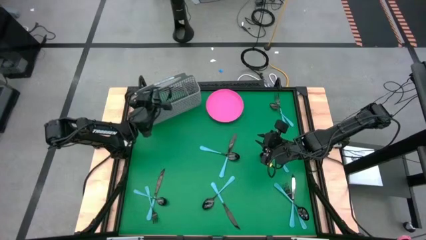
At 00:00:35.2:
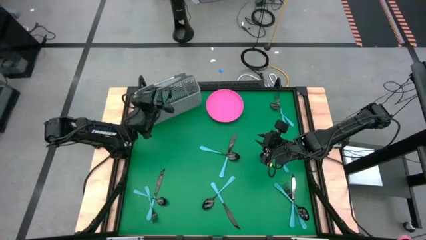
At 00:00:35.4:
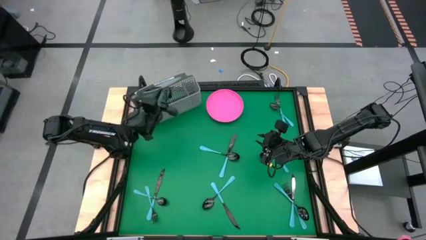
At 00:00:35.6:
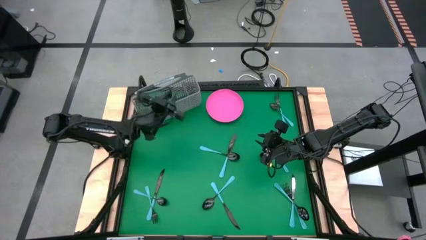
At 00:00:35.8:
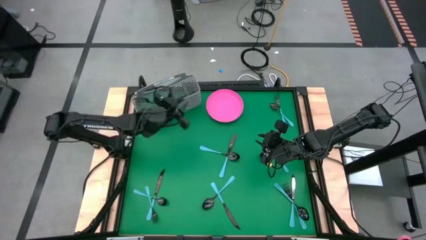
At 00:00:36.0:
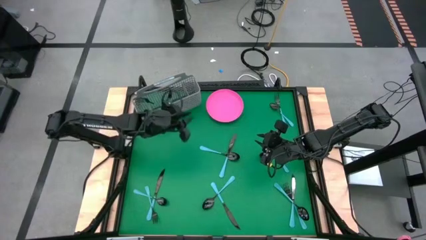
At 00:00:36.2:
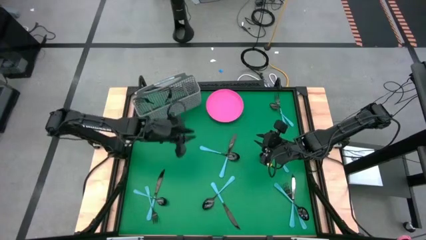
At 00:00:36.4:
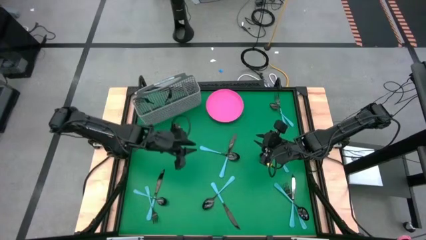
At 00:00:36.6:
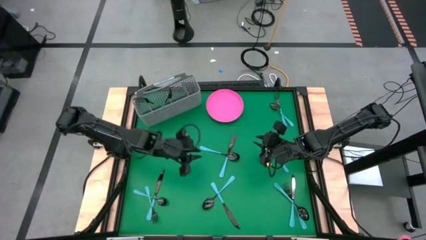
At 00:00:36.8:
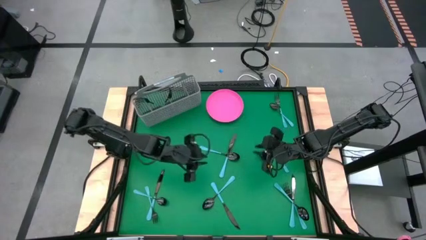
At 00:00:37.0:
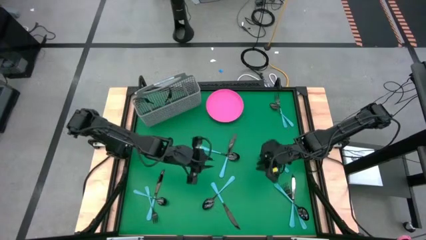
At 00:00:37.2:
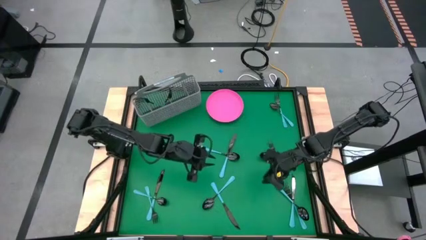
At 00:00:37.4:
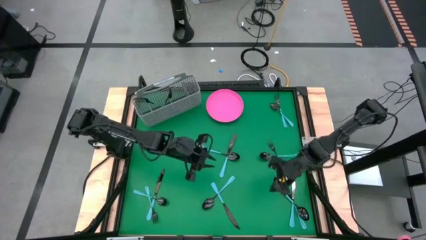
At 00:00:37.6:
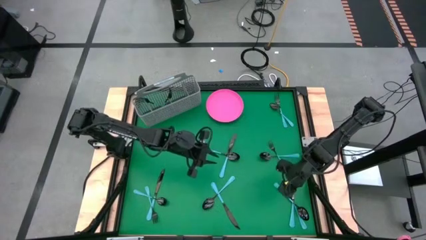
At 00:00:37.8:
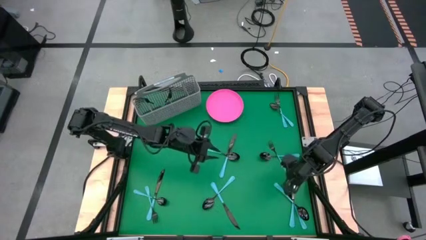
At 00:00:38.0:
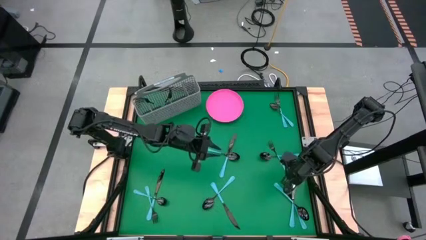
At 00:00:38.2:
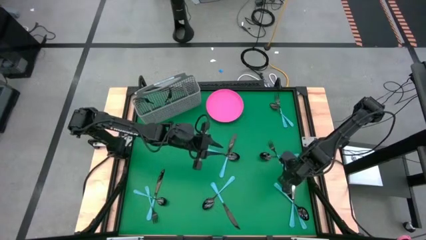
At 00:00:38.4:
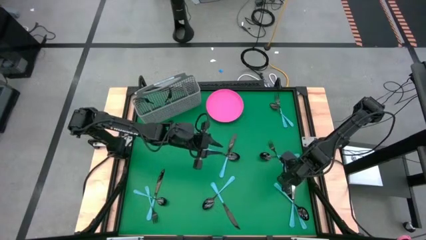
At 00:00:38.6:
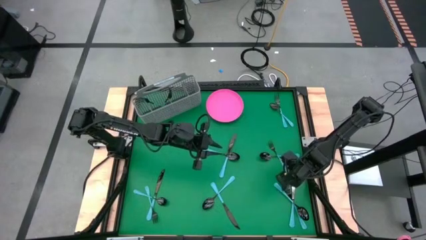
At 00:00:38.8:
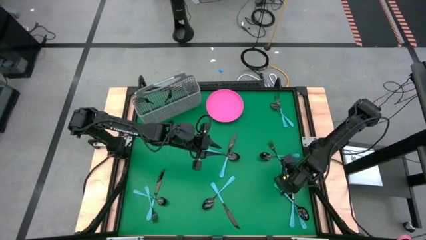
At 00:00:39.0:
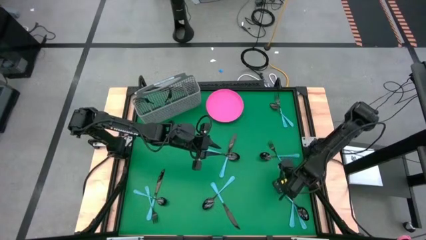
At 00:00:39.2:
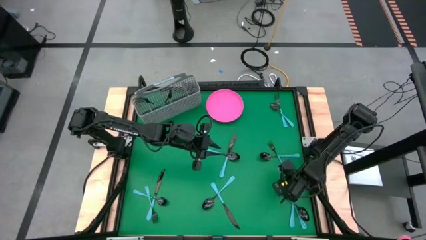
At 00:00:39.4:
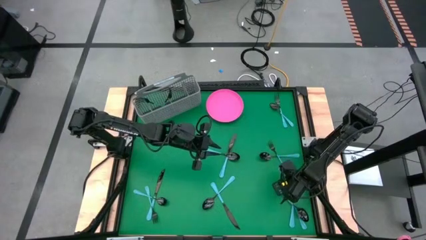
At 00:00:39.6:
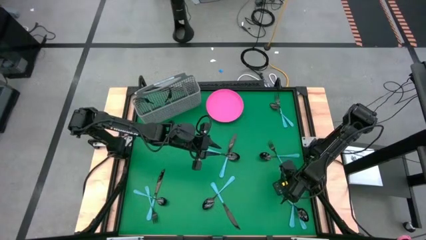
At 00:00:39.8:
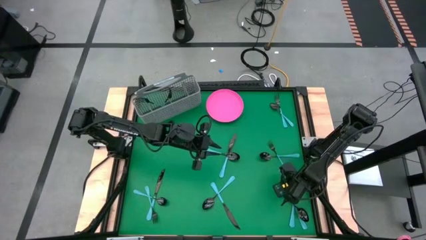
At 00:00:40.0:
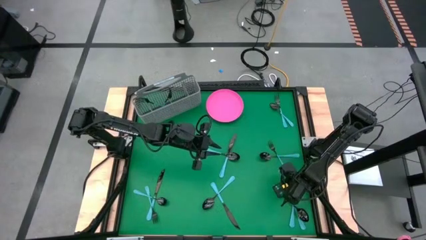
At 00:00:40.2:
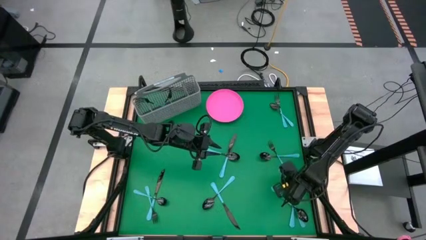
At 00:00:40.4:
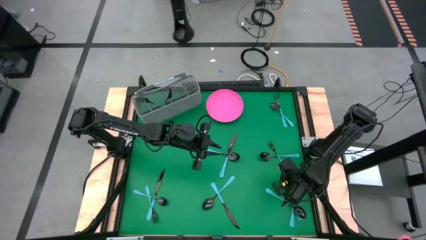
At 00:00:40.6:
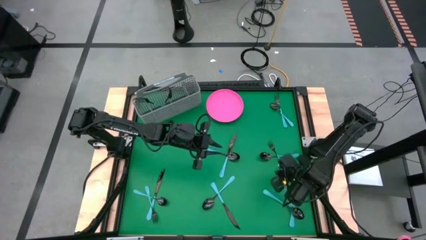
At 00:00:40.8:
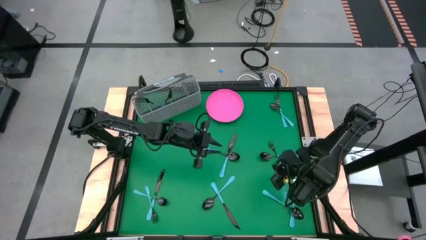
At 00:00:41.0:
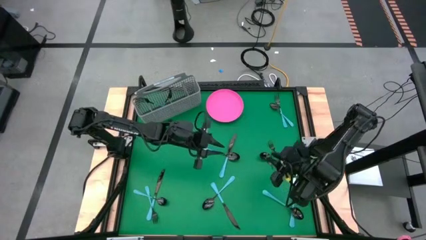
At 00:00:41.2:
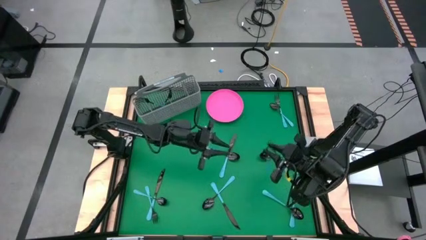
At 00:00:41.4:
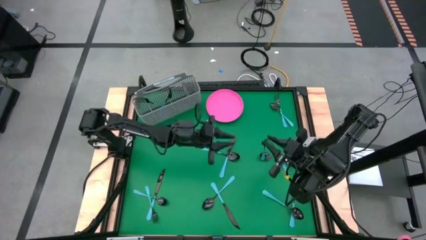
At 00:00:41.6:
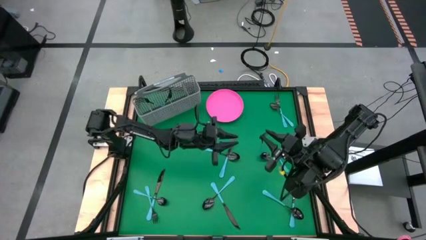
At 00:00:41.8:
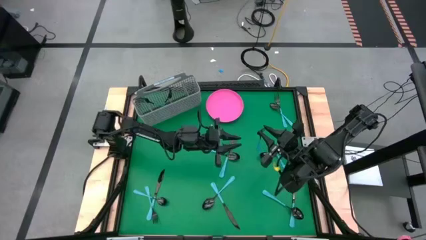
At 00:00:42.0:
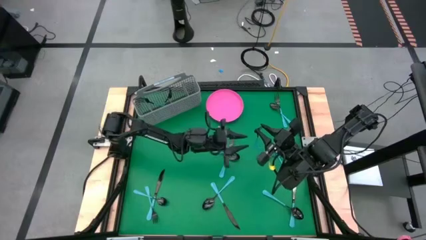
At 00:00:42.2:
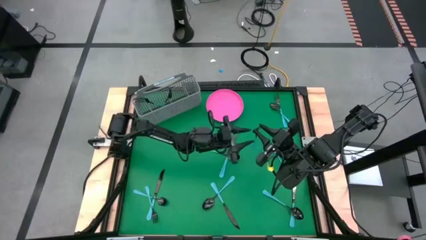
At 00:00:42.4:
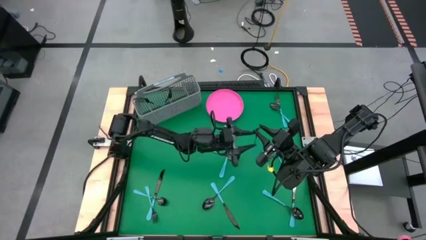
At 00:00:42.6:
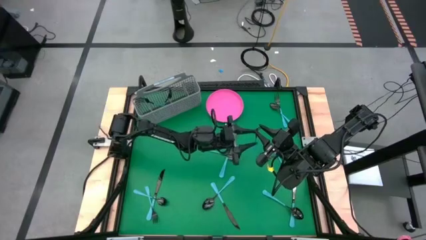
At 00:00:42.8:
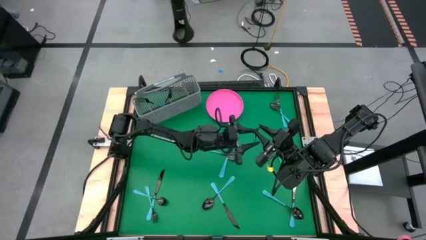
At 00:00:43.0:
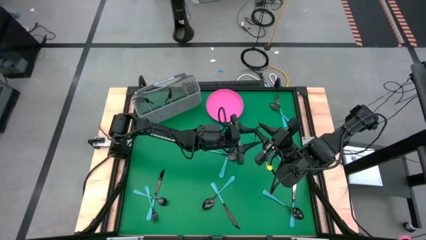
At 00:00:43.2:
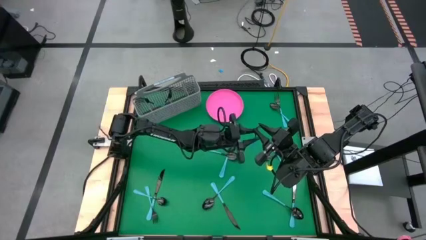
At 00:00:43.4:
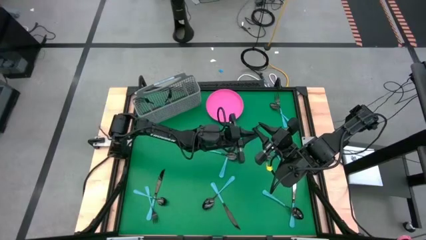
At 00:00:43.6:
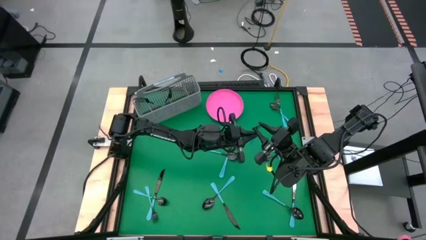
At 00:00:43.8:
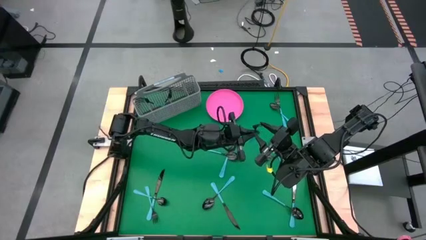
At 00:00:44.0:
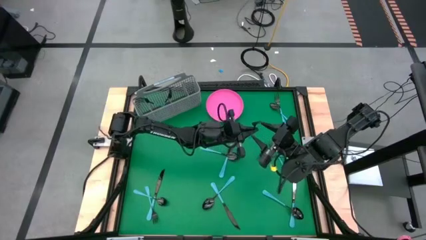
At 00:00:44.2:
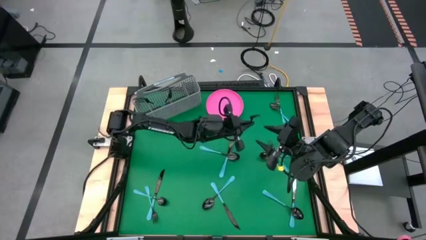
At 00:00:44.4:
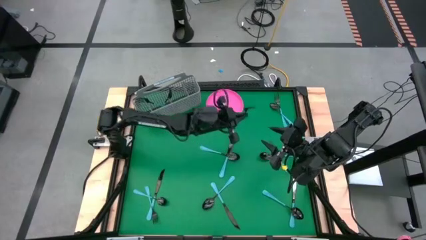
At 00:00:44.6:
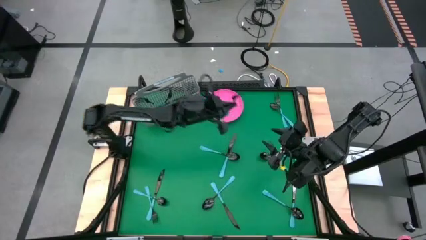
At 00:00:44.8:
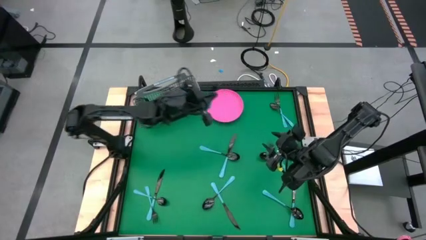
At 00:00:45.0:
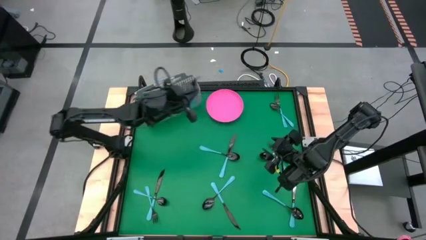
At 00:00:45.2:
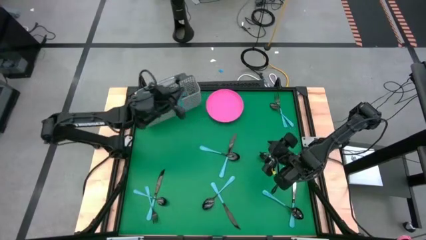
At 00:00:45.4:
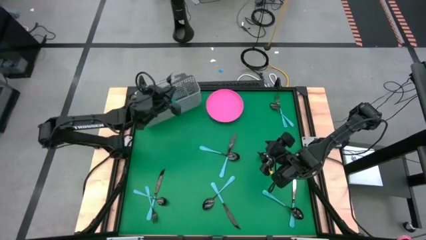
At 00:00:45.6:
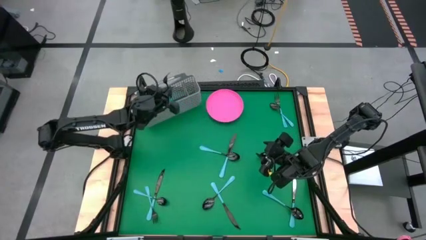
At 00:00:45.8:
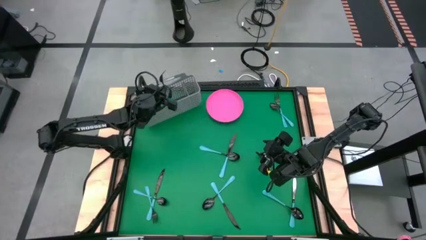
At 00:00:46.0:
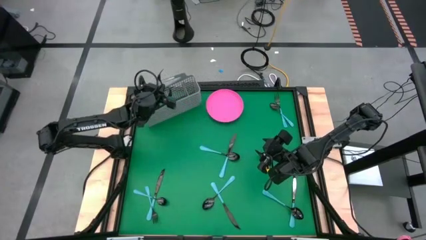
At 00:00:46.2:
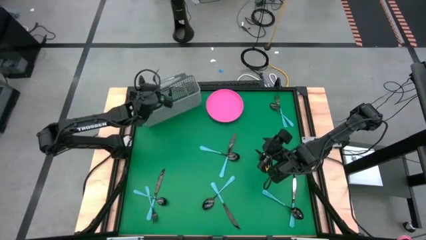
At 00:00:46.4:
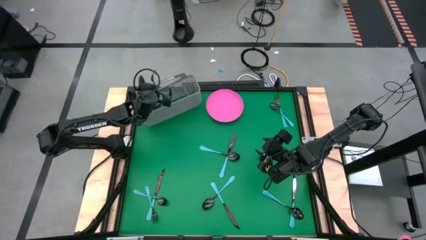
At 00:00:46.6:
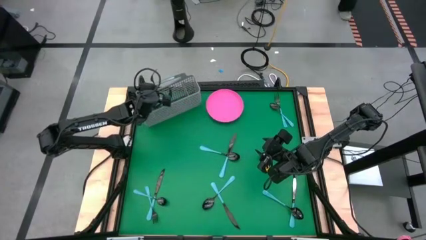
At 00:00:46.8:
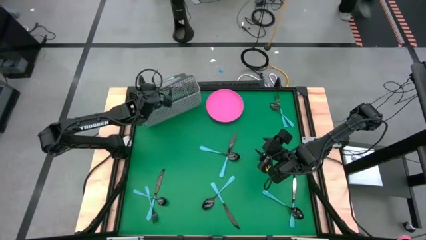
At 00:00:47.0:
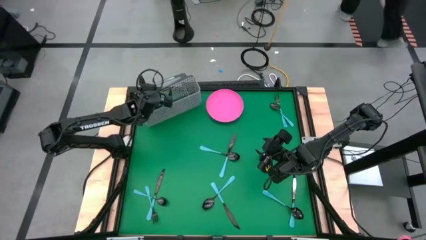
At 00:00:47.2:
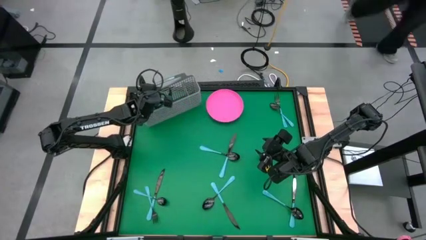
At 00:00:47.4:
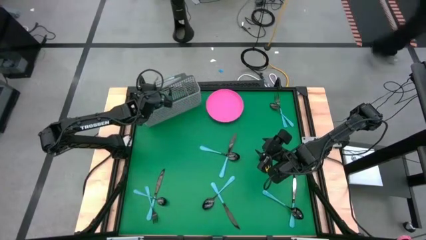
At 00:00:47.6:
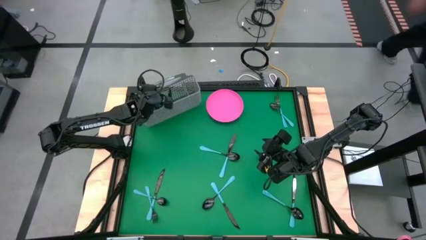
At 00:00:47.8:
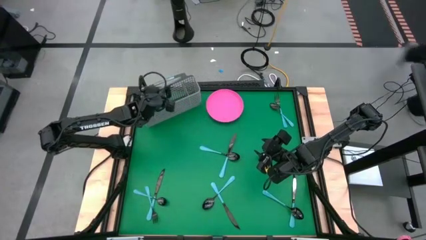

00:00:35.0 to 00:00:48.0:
Task: Sort silverware
Put the blue fork into the gray silverware holder

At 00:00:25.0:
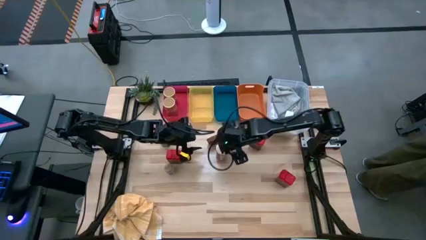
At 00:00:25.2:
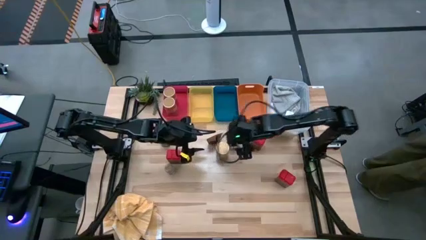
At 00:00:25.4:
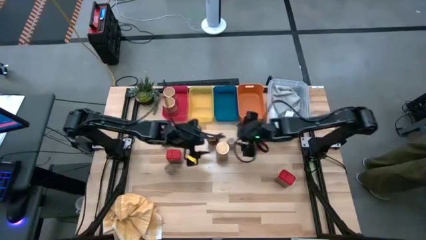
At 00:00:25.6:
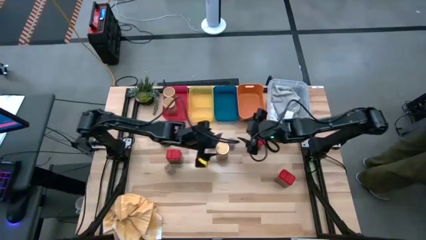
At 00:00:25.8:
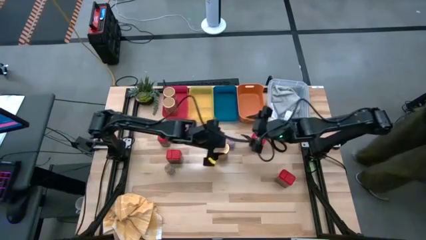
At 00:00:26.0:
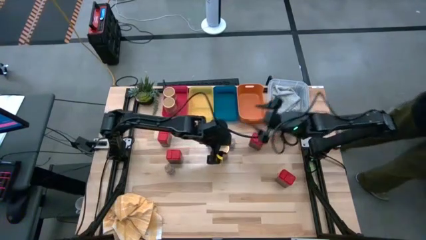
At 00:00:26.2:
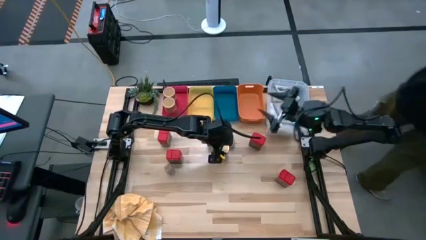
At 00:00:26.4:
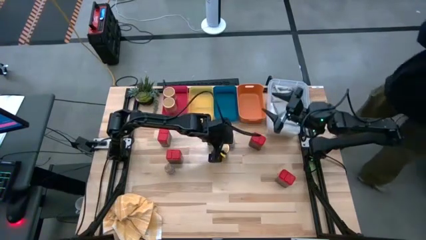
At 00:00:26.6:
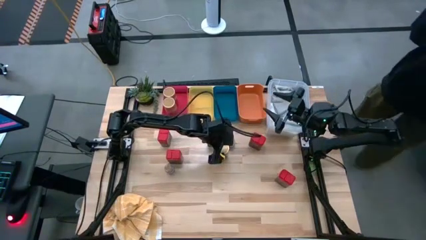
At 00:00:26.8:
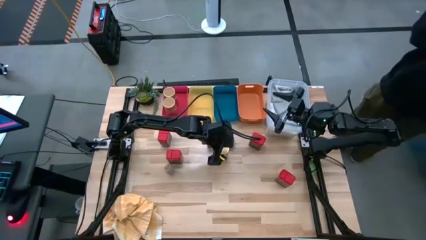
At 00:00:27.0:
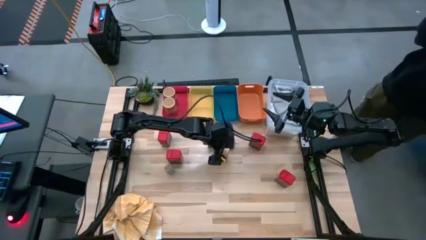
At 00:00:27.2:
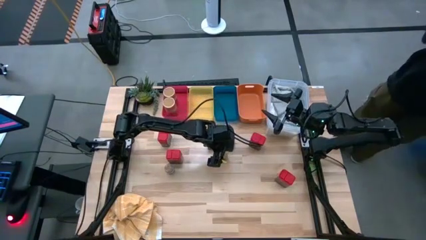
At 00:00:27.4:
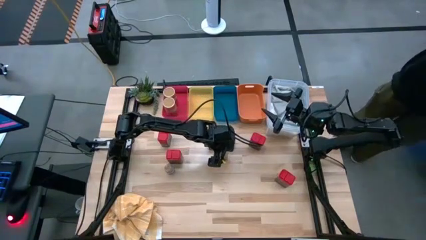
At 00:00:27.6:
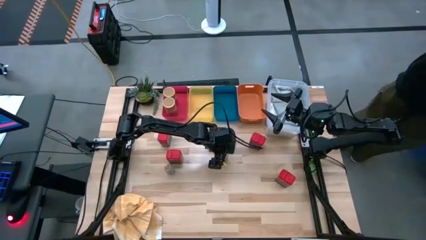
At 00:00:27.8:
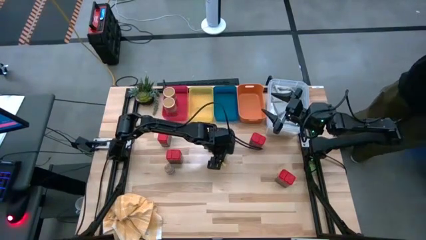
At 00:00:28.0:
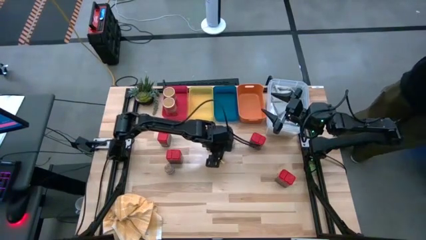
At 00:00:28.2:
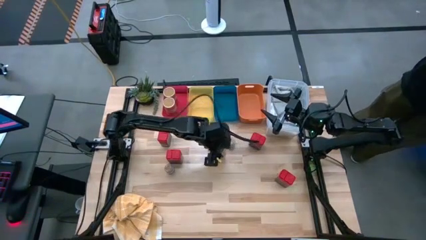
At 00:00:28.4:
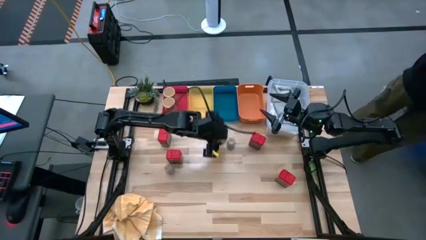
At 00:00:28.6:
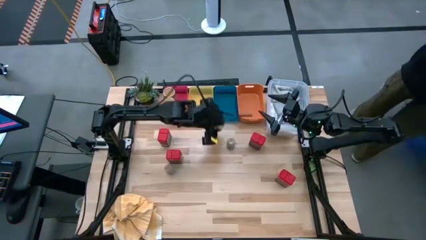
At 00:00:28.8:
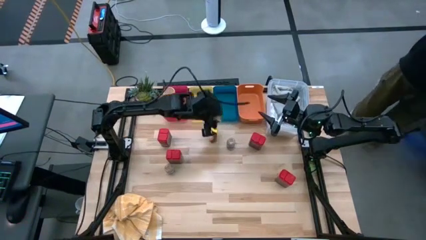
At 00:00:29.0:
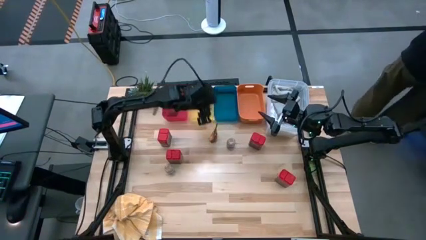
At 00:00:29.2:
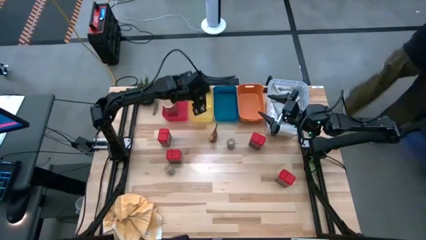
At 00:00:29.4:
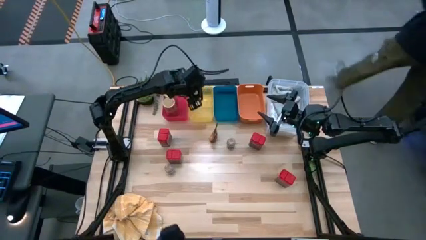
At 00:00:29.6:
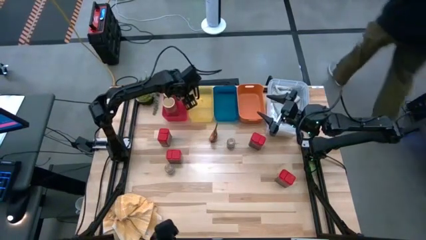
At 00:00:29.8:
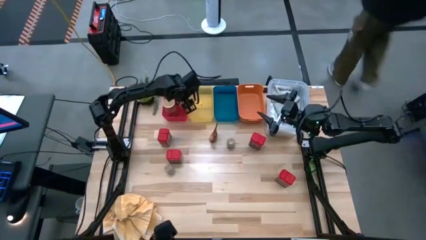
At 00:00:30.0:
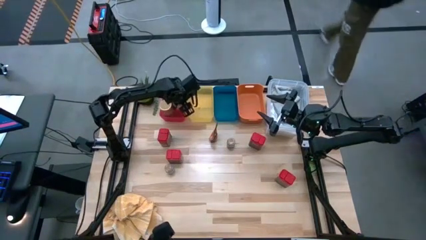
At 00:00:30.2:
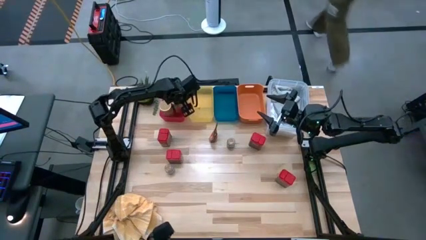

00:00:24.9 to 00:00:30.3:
Task: Sort spices by type
Put the gold spice bottle into the red bin
